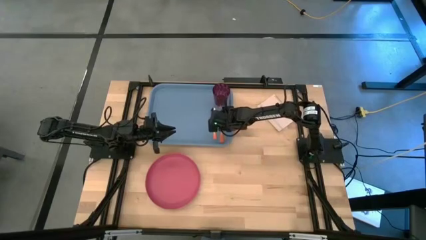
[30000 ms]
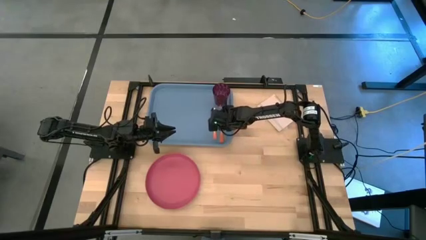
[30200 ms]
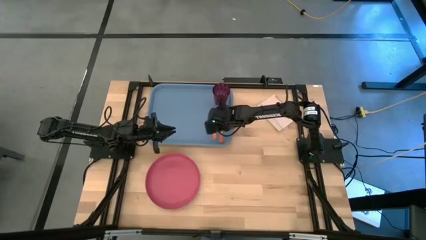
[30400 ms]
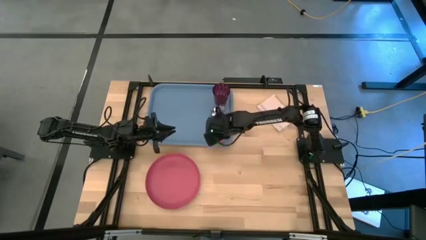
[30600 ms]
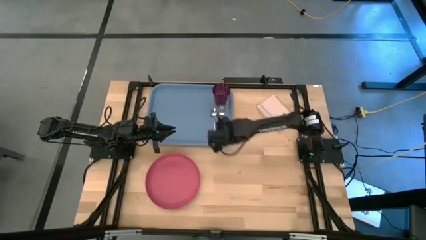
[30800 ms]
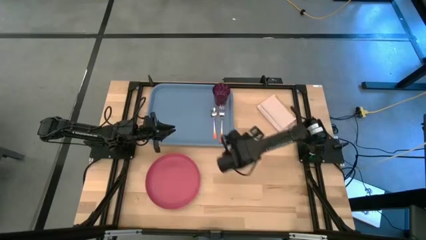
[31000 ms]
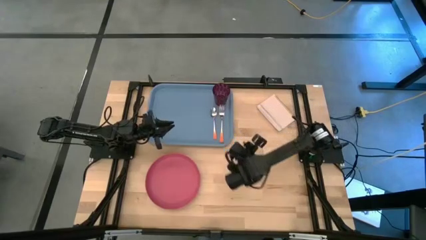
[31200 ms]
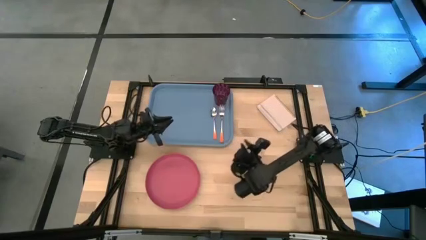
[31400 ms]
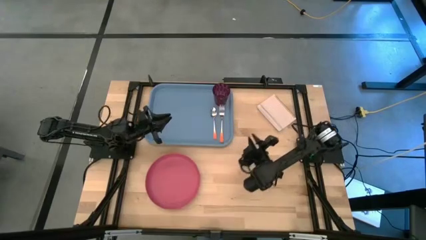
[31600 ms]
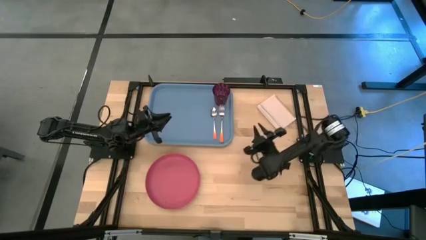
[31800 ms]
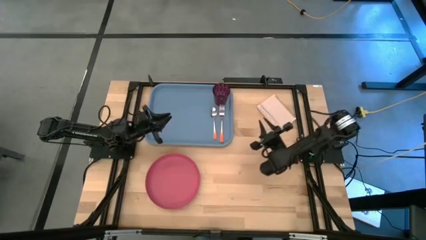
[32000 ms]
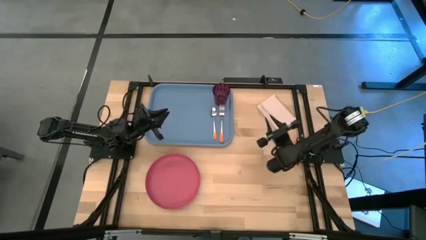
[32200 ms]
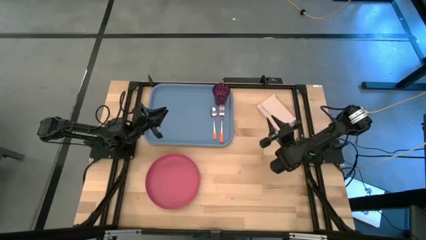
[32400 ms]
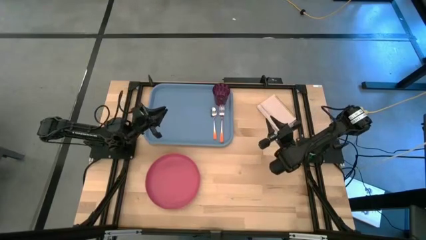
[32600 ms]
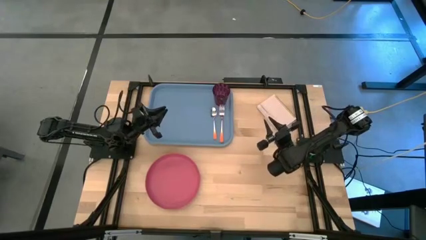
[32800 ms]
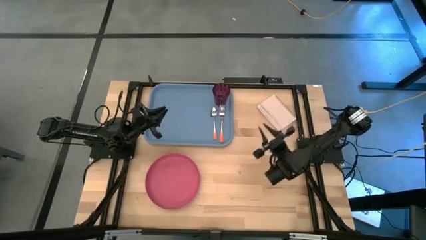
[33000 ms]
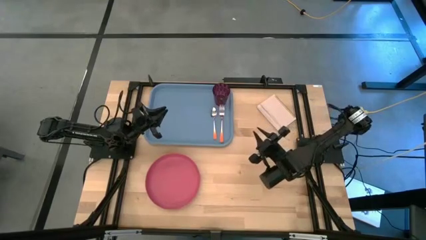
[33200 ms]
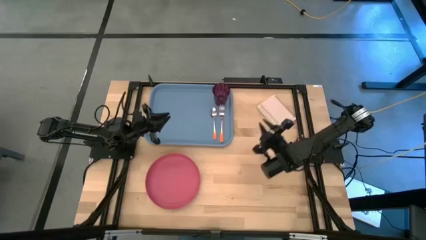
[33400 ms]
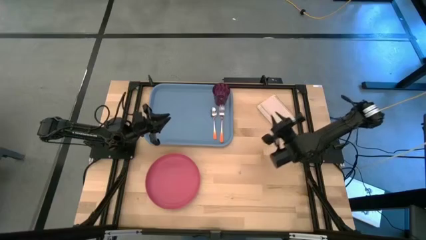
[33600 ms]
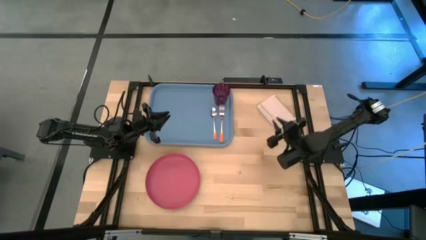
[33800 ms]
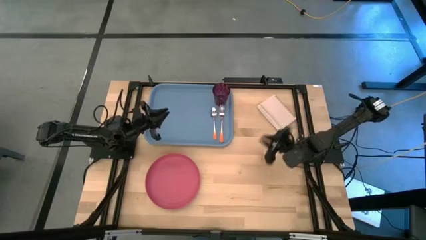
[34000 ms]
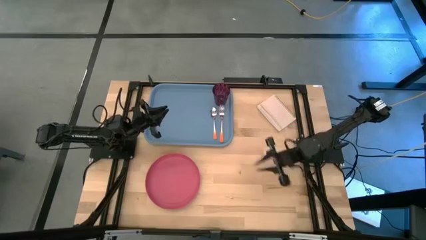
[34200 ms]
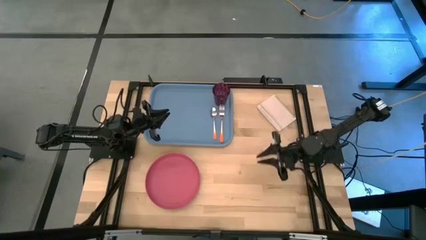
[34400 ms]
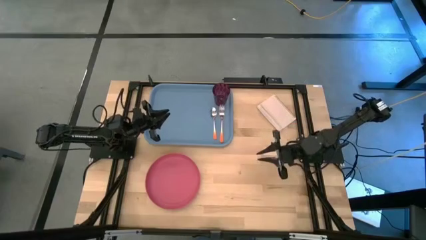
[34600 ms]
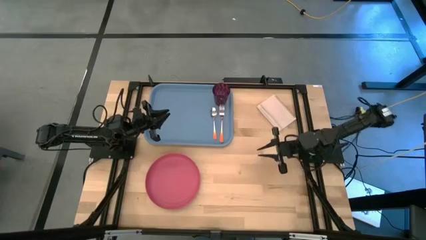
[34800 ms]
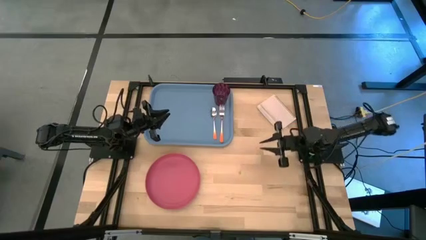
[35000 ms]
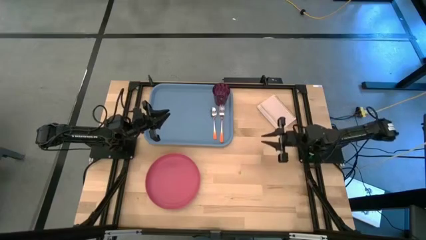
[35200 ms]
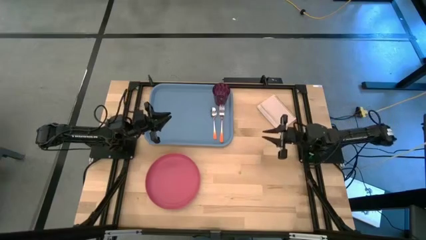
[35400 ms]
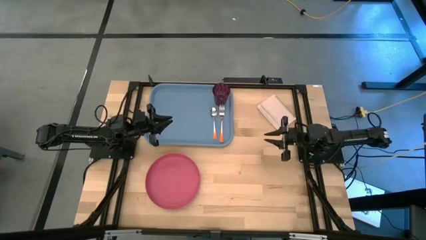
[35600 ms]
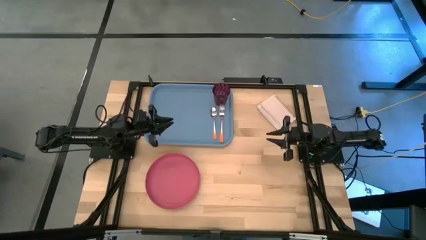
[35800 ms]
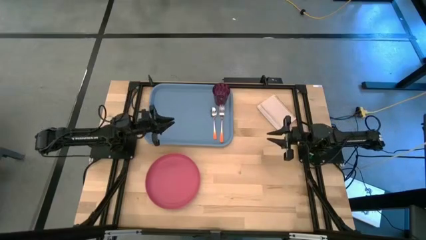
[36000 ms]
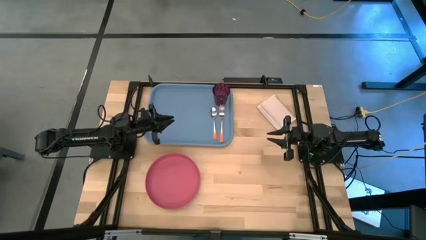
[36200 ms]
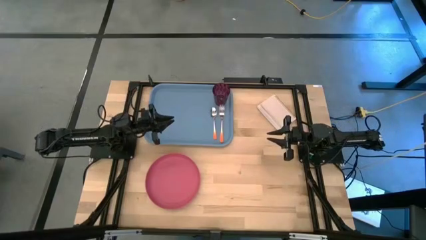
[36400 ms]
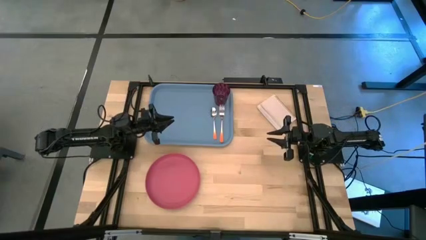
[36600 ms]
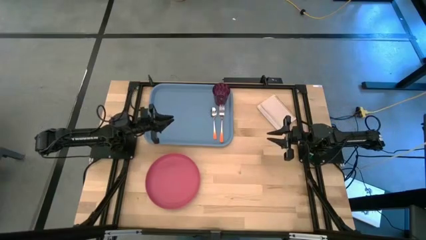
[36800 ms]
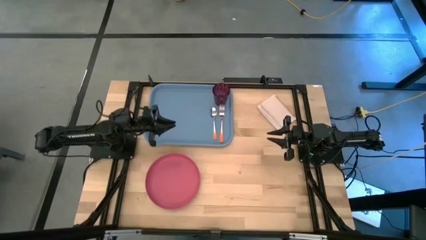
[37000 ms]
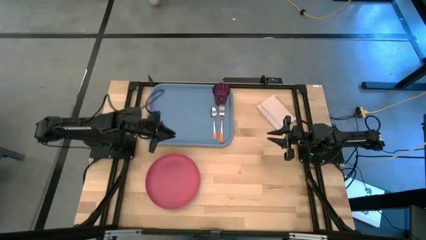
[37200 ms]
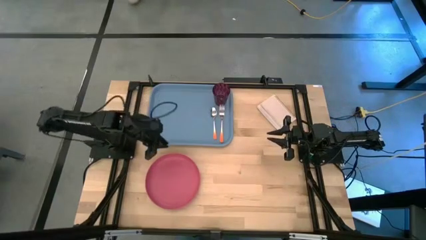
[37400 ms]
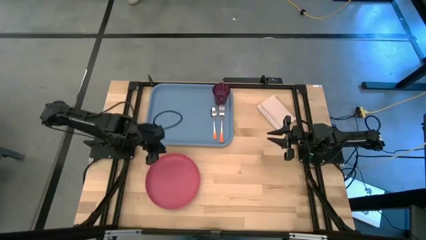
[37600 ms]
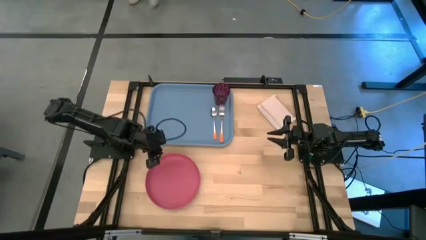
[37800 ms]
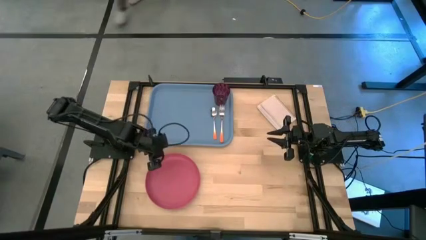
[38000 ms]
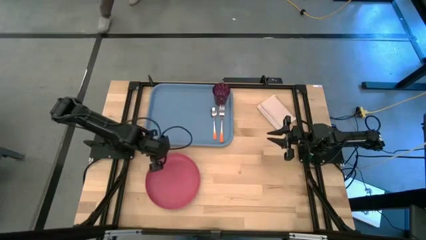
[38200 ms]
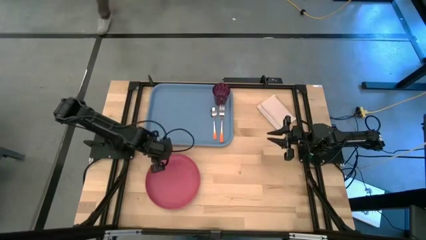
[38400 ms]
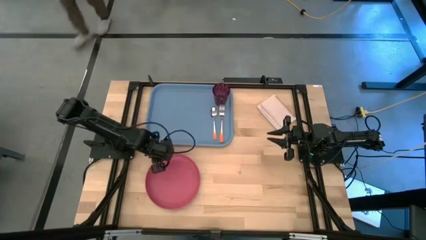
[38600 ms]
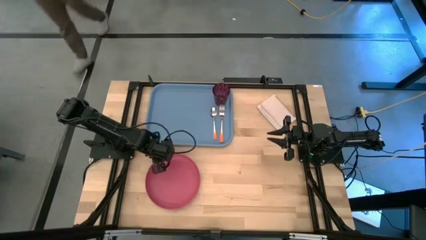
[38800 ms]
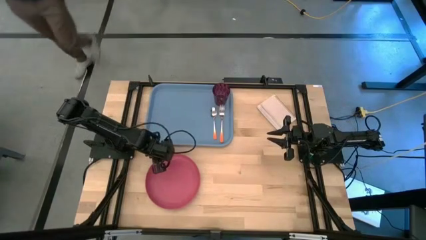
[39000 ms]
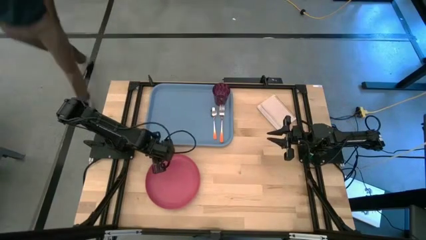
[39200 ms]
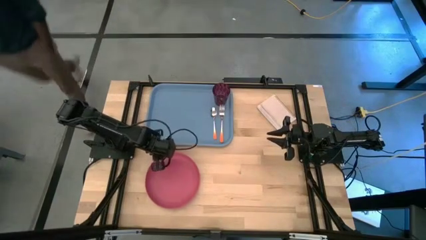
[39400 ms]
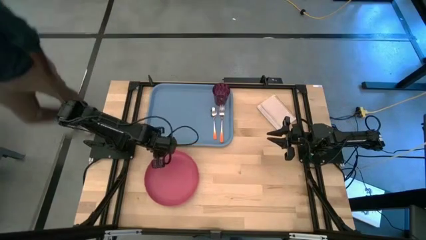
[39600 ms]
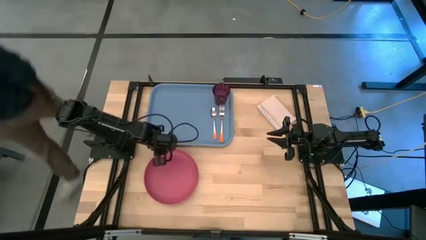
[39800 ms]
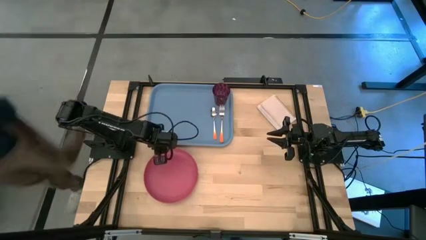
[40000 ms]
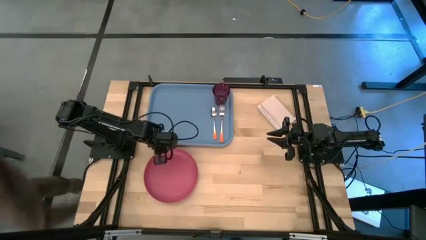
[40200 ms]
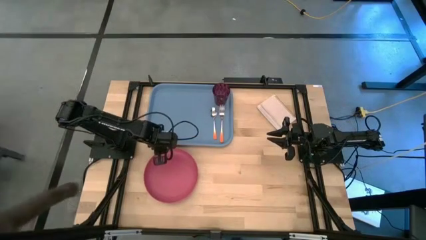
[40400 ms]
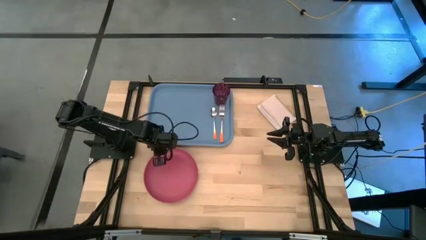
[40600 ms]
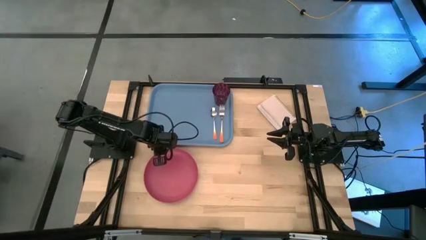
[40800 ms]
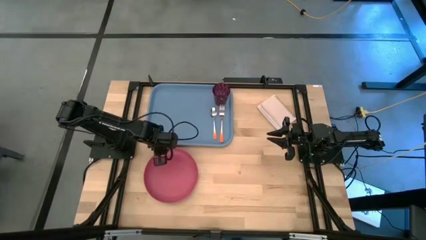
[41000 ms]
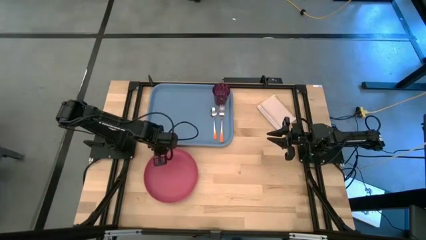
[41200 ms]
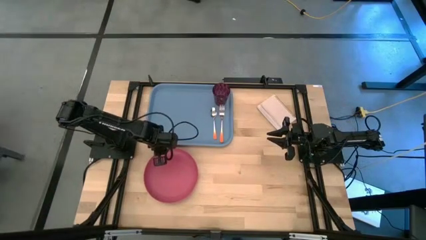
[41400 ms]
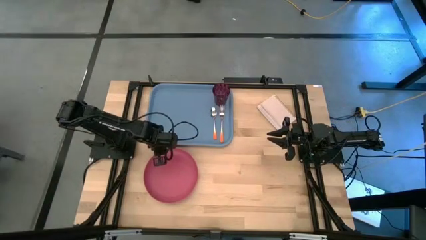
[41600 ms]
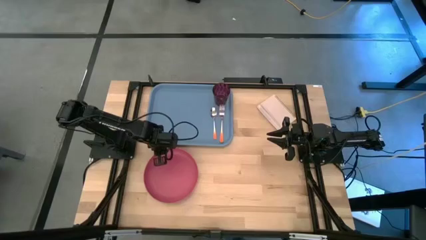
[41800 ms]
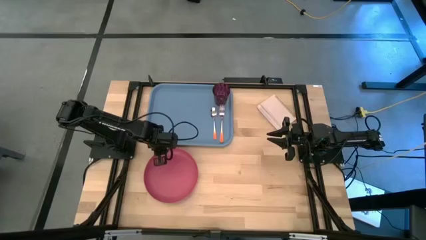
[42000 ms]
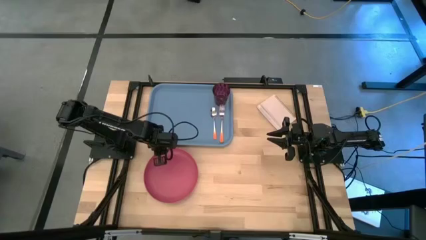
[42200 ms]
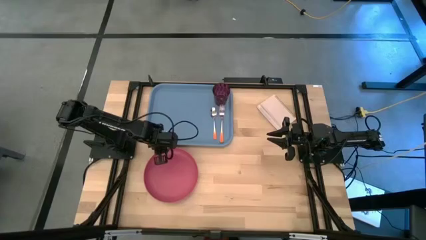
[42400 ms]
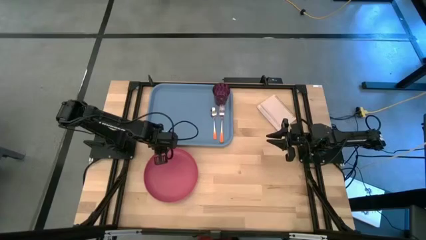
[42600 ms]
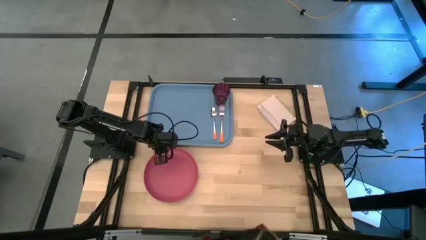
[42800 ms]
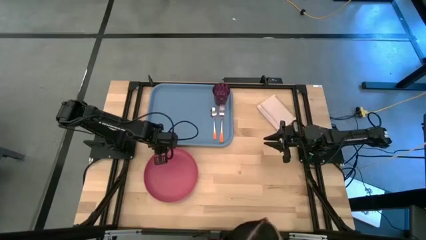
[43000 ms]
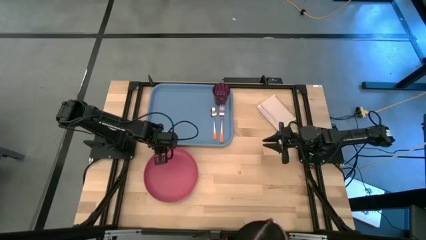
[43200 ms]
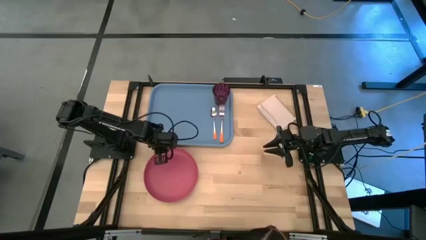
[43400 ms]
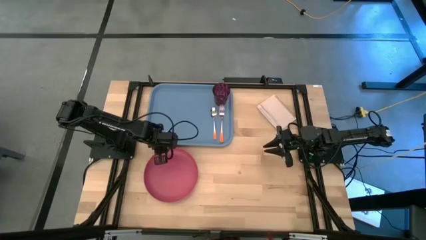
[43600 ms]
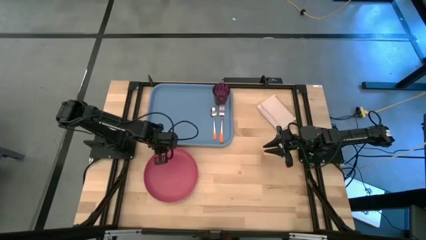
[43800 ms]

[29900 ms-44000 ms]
Task: Pick and place plate/cup/fork/spoon on tray
Put the pink plate on the blue tray
